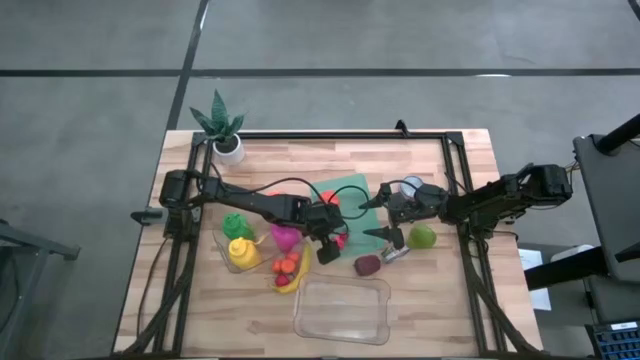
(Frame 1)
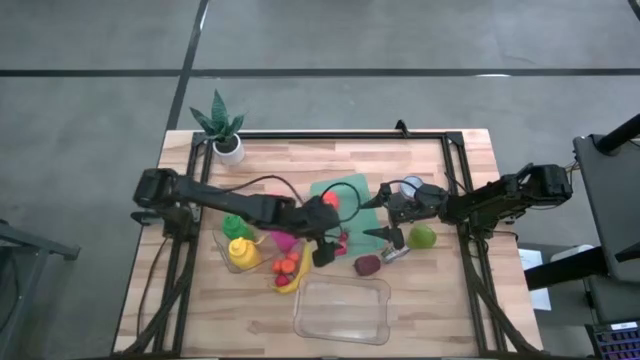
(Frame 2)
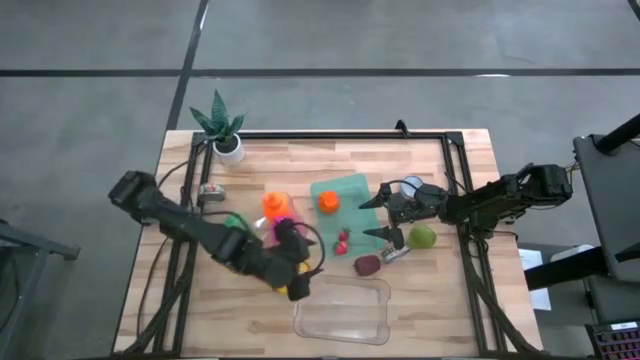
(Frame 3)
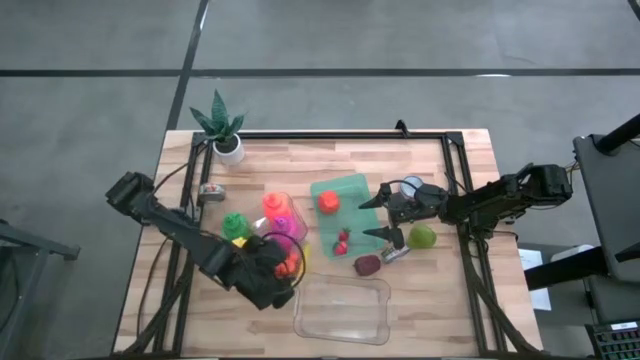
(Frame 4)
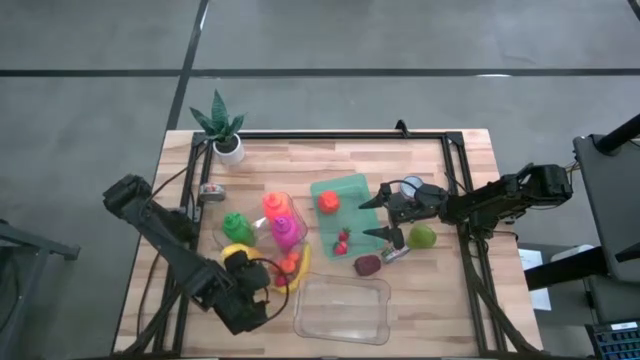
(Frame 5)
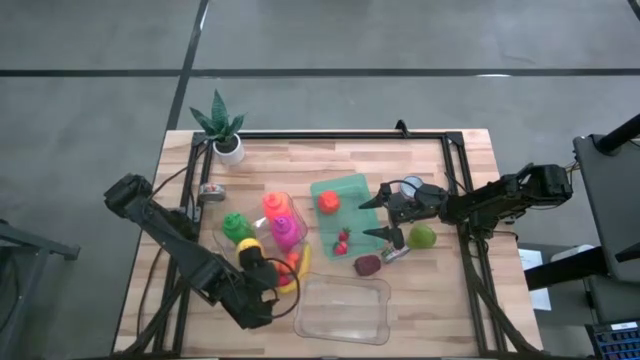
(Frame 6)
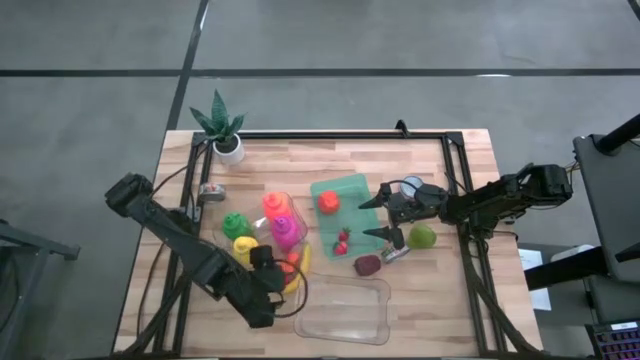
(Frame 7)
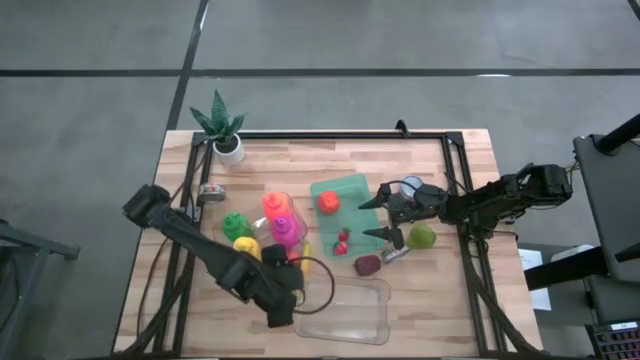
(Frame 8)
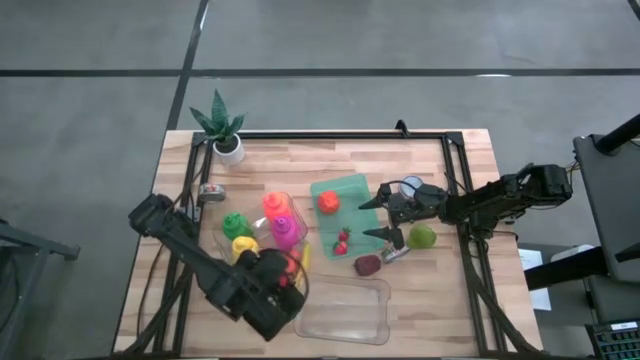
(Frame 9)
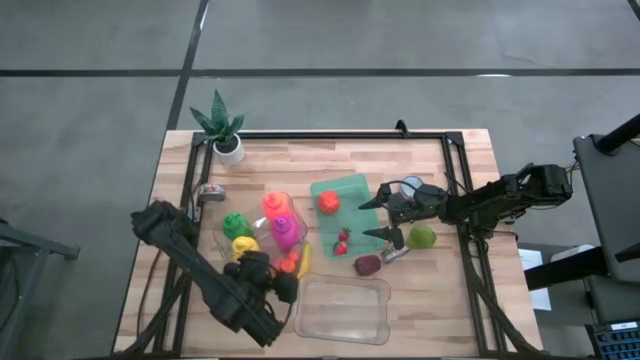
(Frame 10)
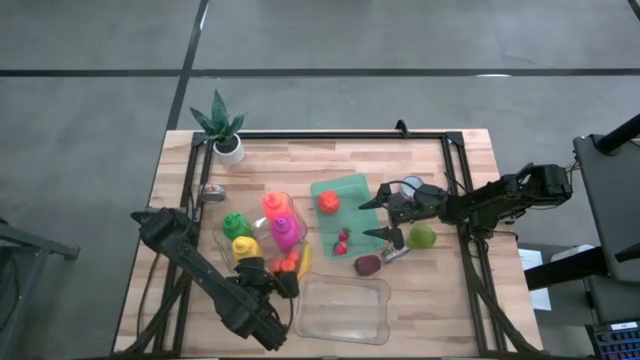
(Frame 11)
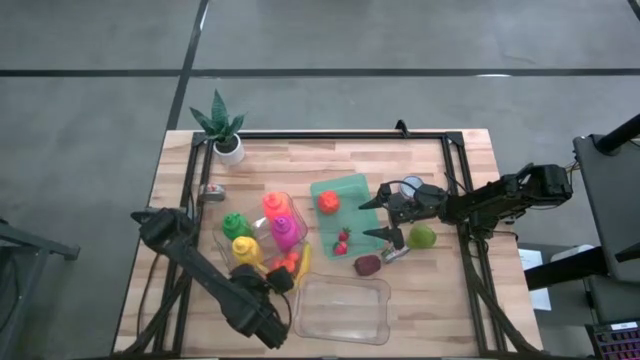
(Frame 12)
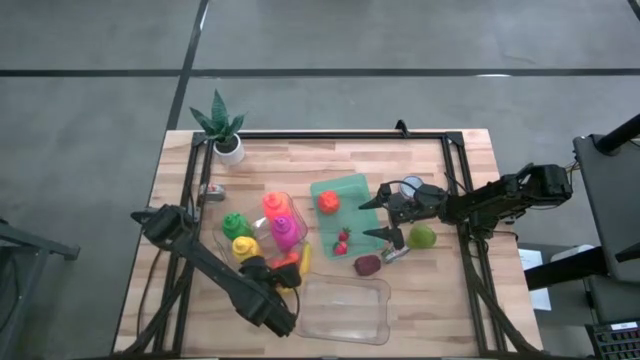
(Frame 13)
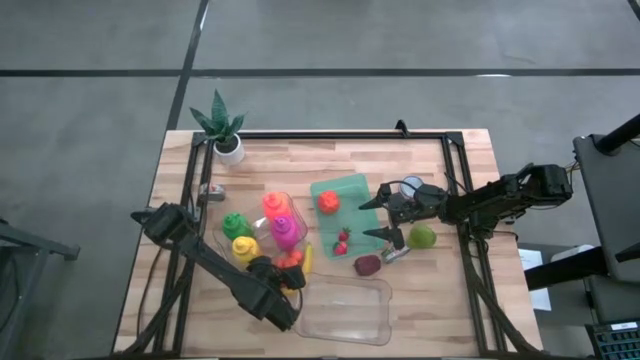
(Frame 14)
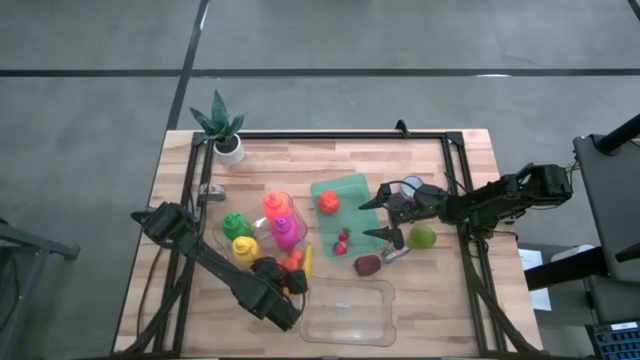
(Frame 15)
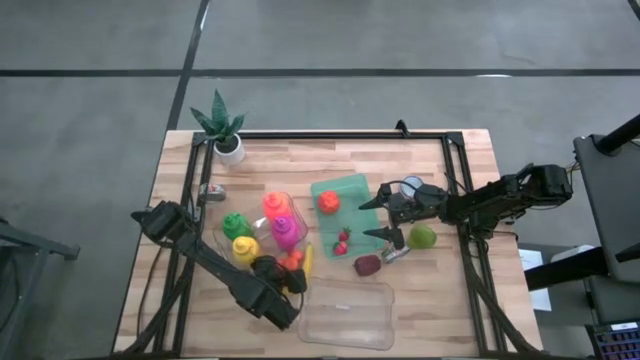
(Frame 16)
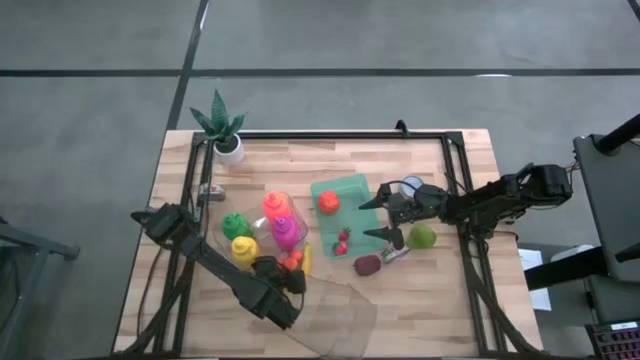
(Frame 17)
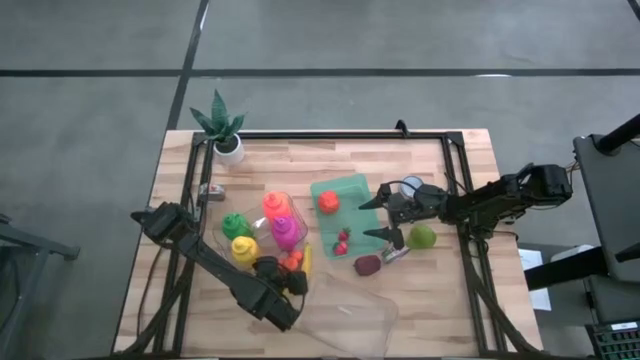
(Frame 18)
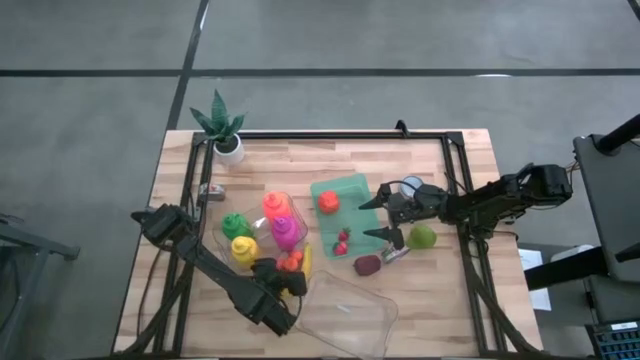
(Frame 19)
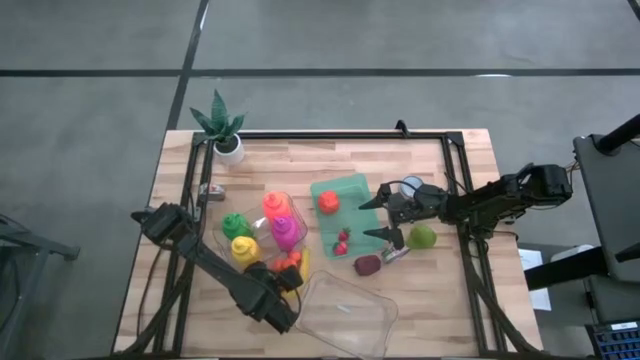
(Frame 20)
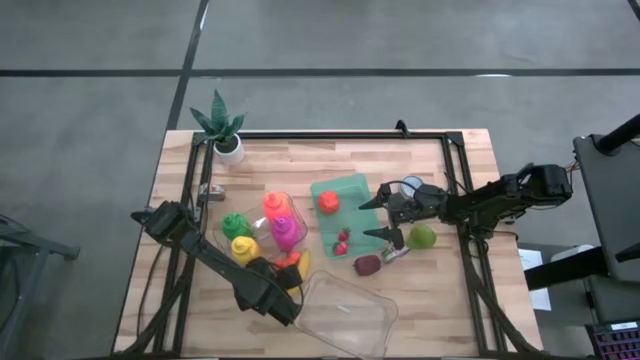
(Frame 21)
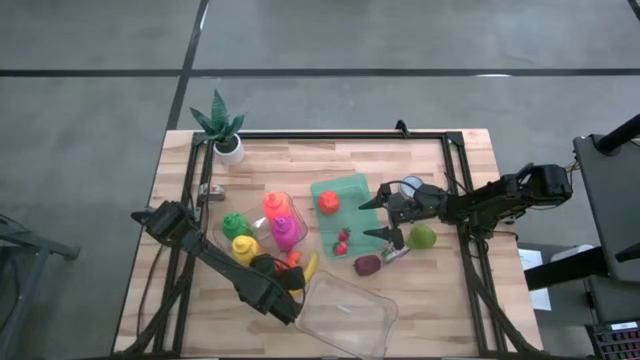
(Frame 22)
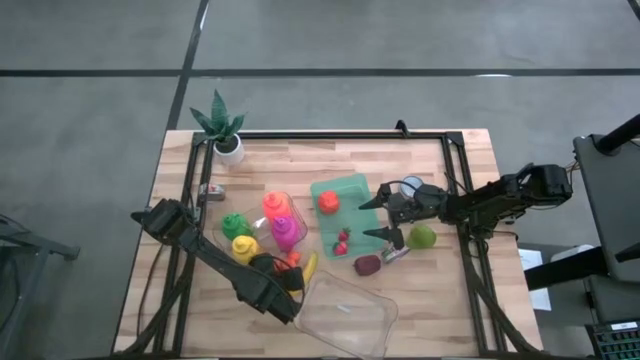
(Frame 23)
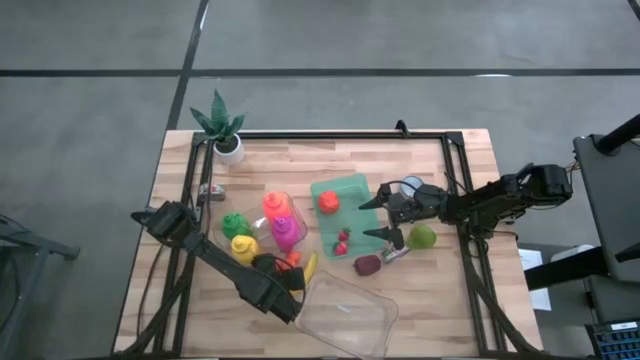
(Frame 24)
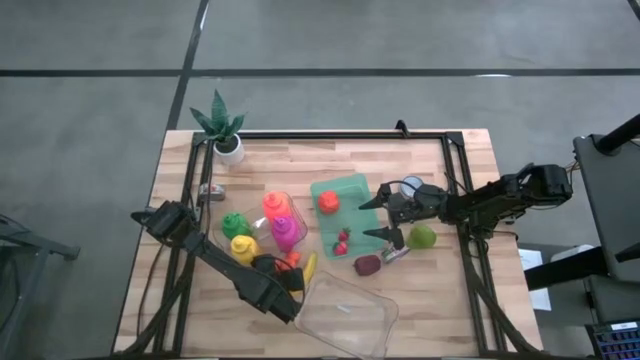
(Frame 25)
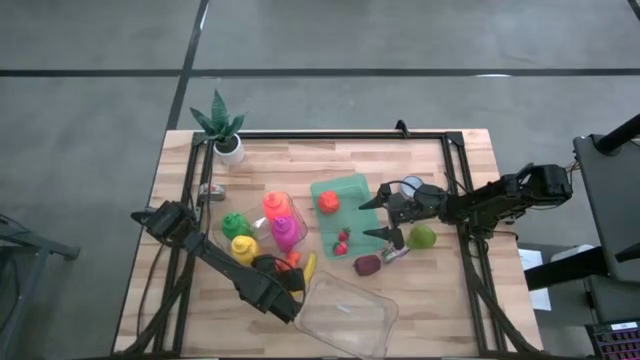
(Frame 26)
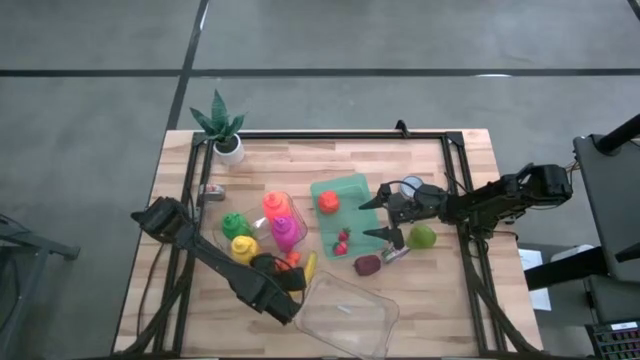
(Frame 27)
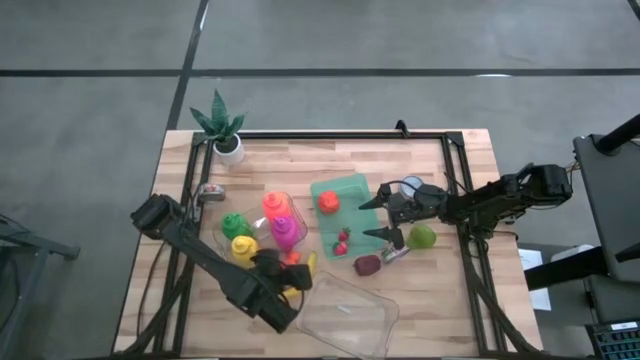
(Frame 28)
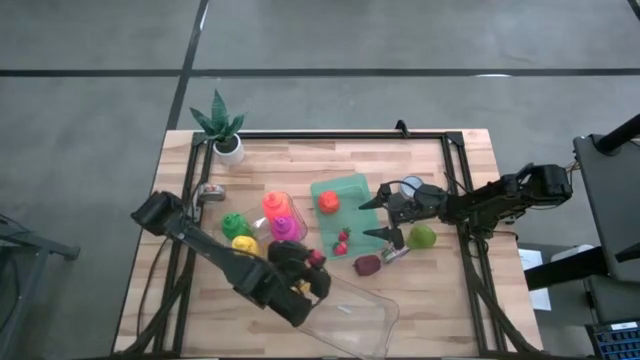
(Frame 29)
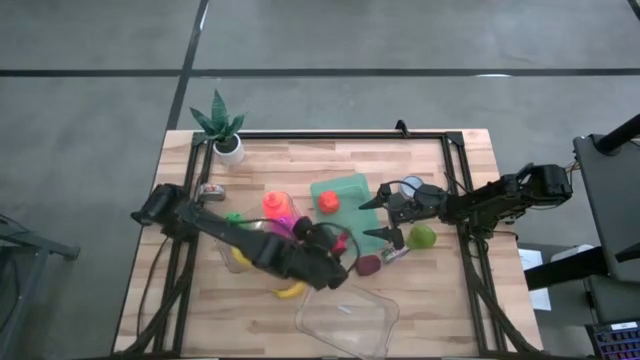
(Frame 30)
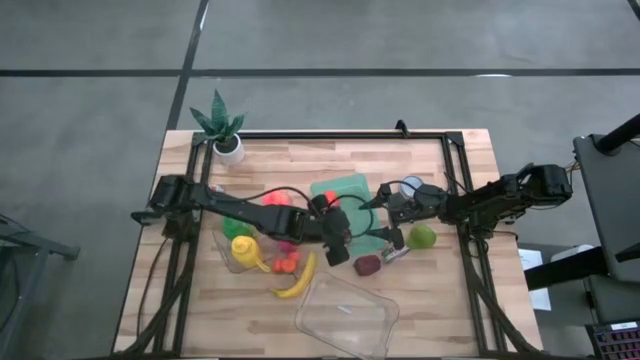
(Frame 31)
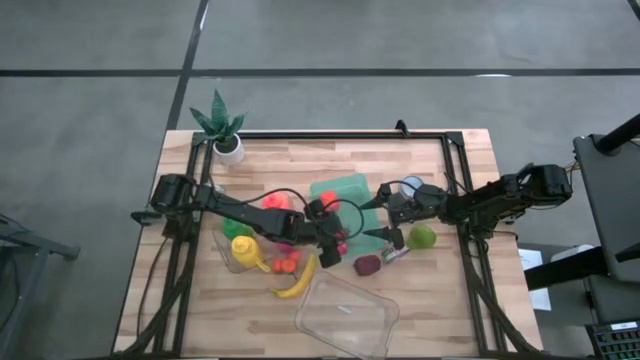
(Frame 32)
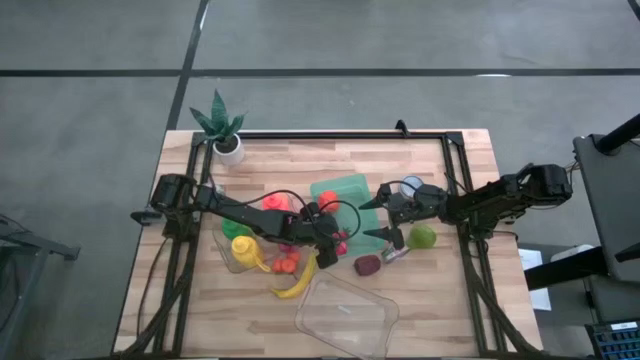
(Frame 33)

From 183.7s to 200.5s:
Task: Pick & Place Food Item
Put the red strawberry into the green bin

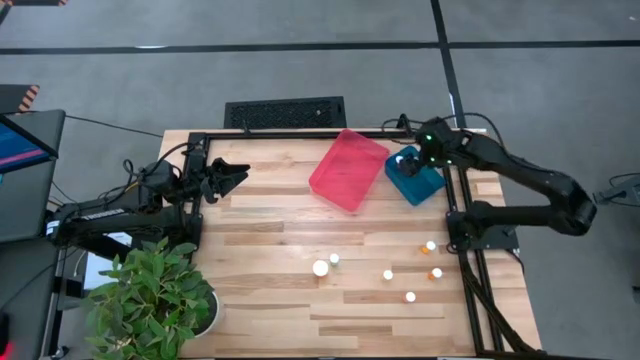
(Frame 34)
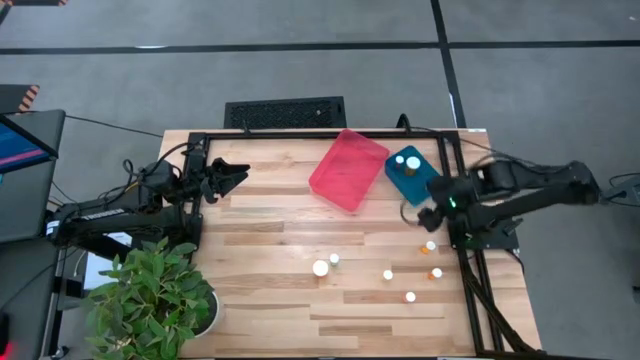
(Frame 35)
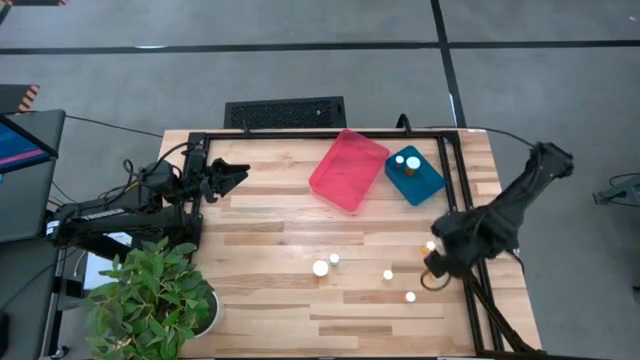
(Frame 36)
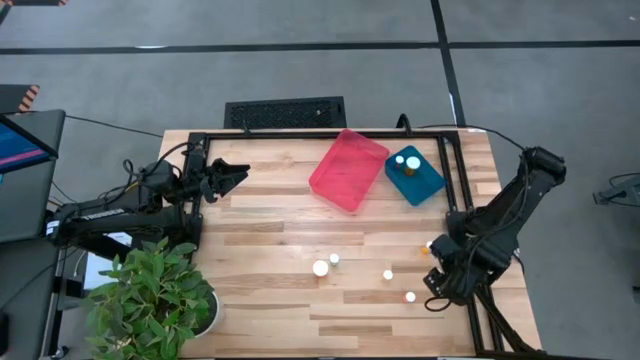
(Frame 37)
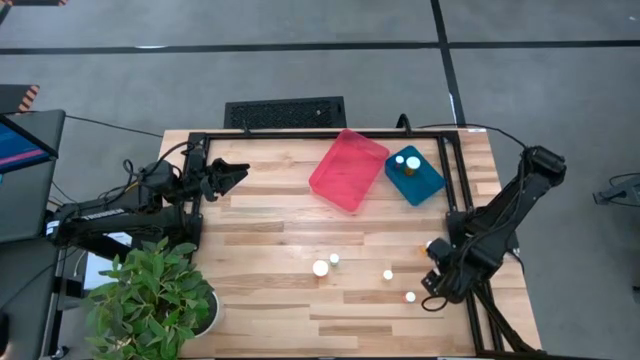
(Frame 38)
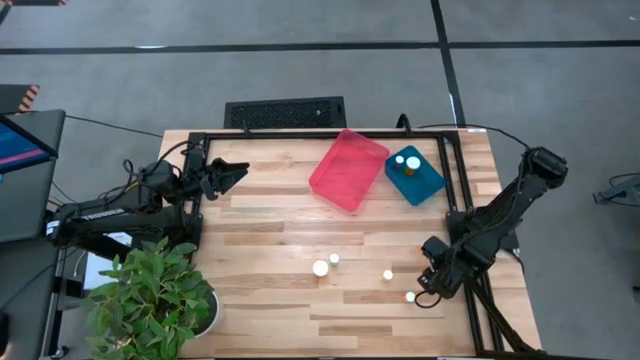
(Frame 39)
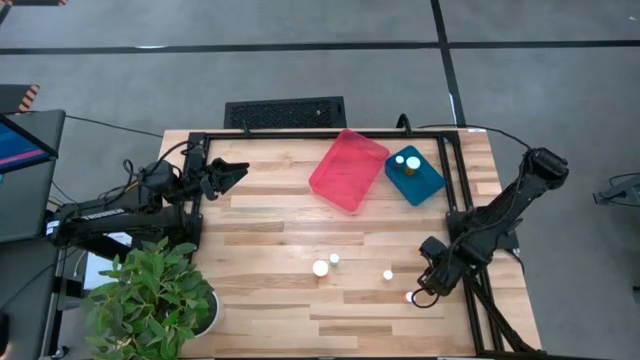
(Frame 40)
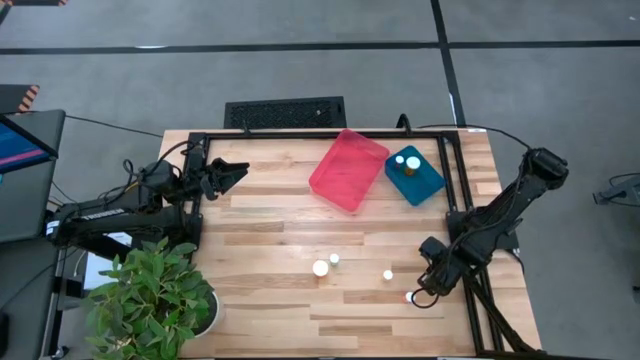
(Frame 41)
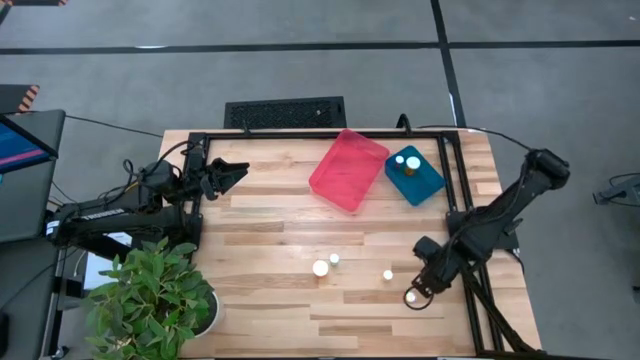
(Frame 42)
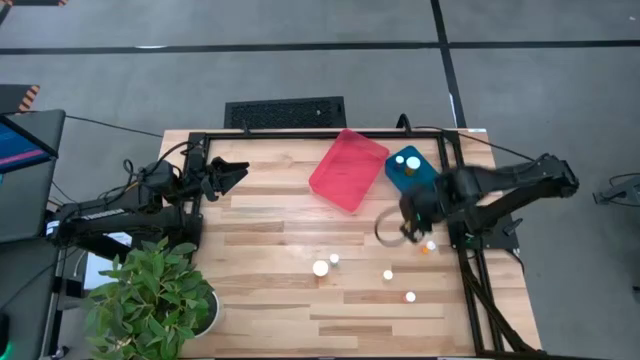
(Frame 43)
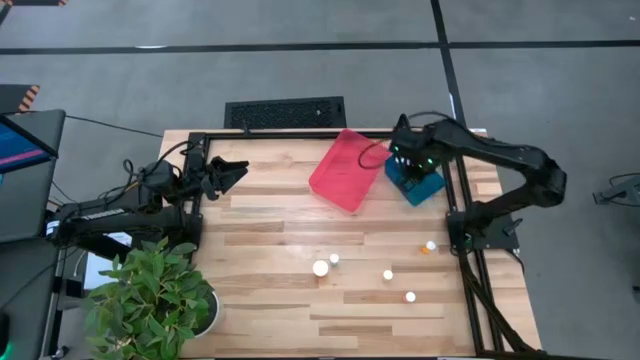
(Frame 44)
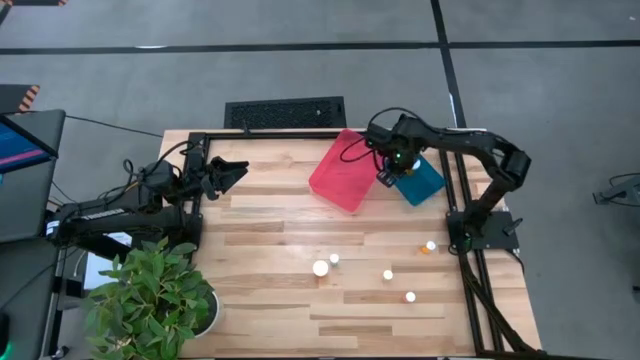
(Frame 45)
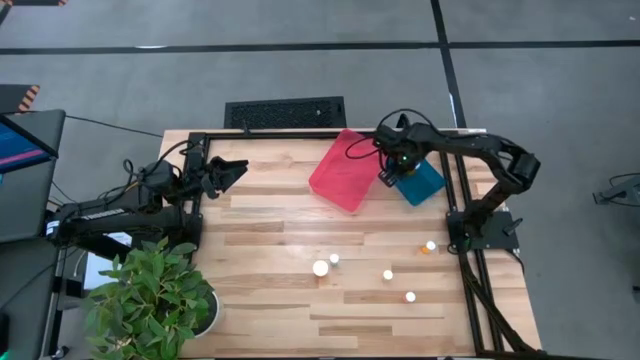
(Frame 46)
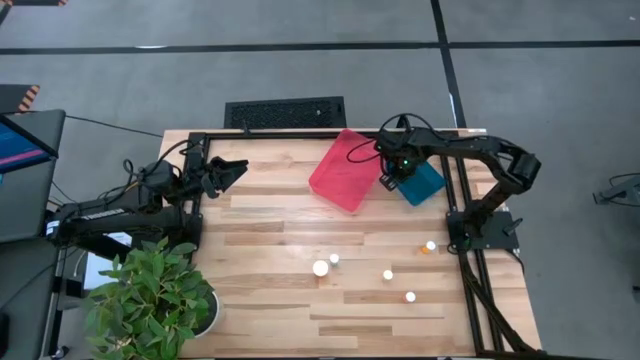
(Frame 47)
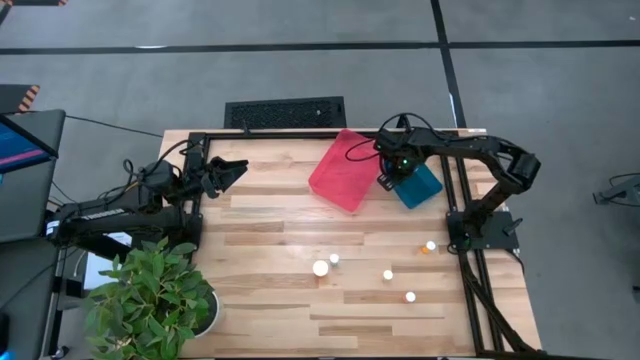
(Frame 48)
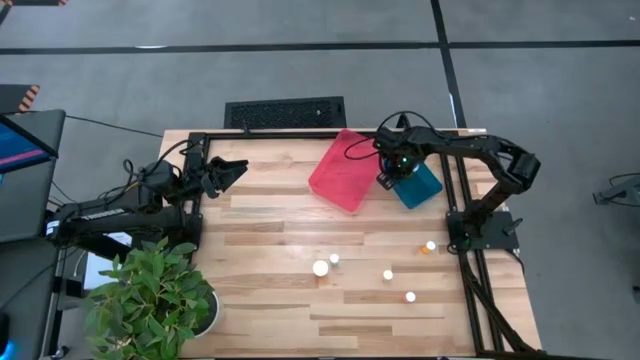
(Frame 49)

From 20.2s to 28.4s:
Task: Pick and place medicine bottles into bin by pill shape (circle, oval)
Put the small orange capsule bottle into the blue bin
